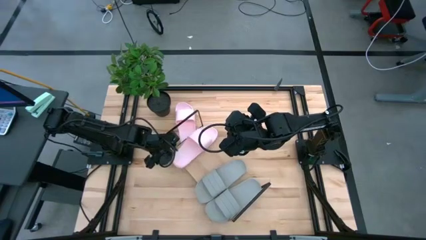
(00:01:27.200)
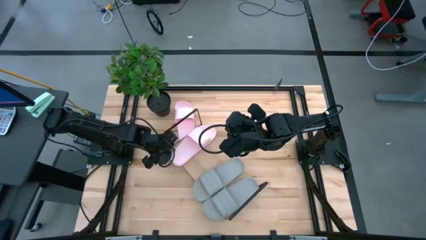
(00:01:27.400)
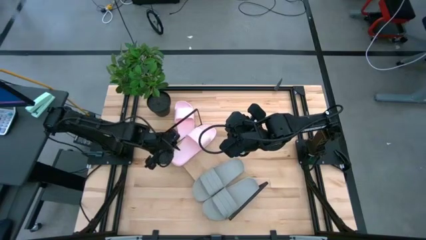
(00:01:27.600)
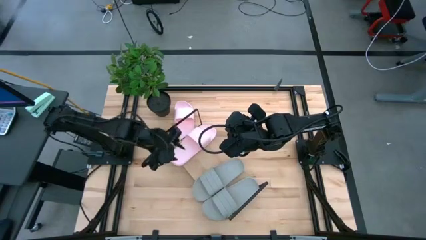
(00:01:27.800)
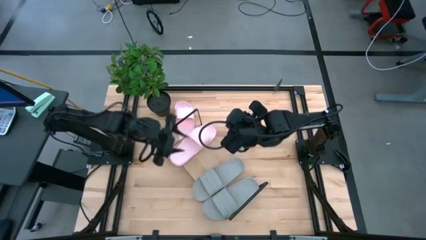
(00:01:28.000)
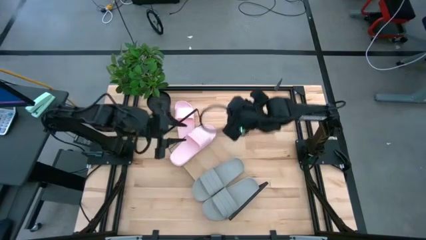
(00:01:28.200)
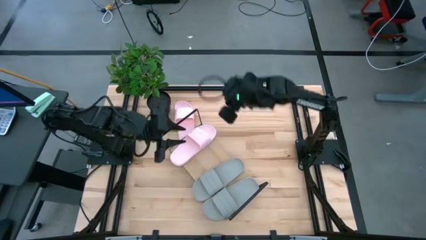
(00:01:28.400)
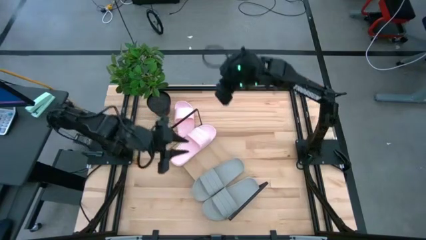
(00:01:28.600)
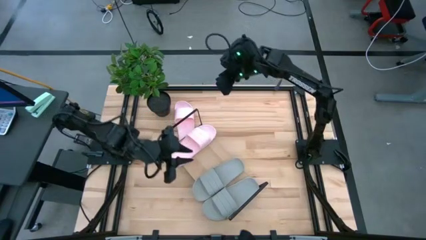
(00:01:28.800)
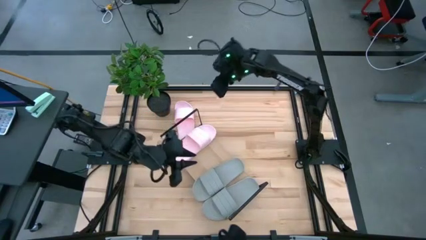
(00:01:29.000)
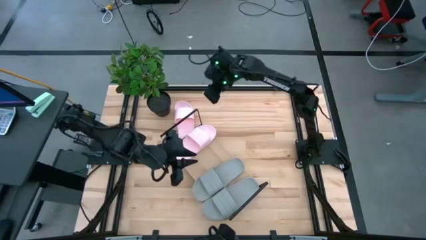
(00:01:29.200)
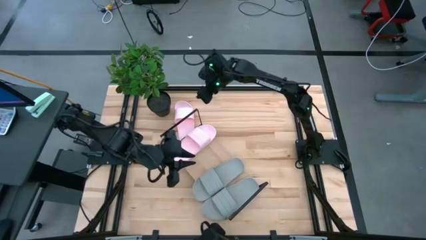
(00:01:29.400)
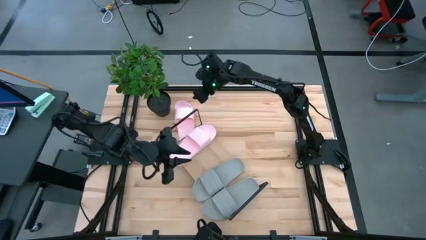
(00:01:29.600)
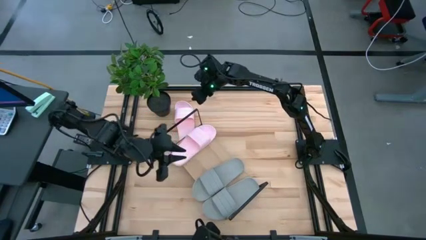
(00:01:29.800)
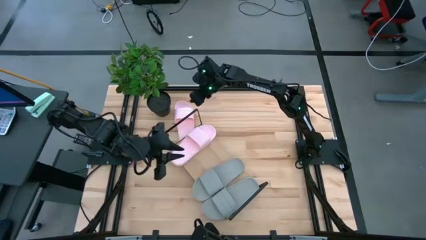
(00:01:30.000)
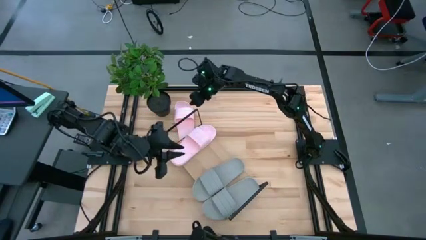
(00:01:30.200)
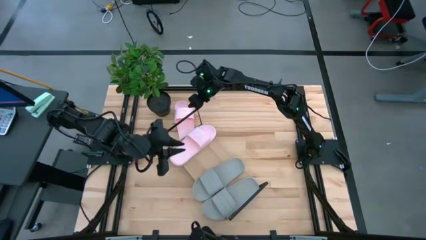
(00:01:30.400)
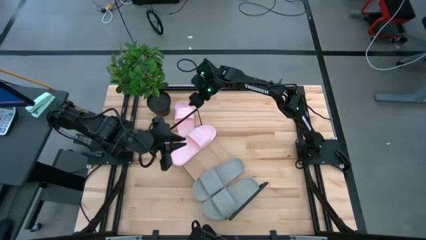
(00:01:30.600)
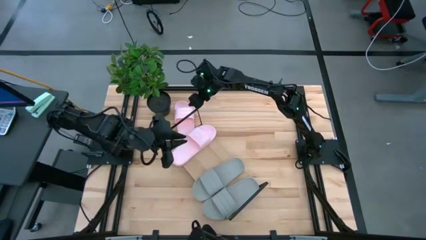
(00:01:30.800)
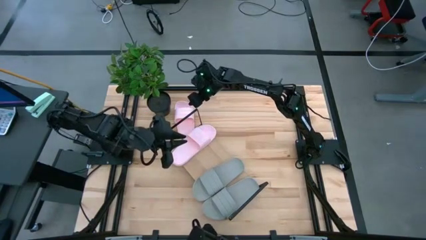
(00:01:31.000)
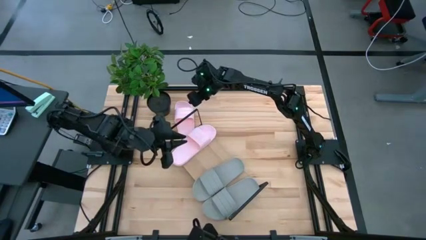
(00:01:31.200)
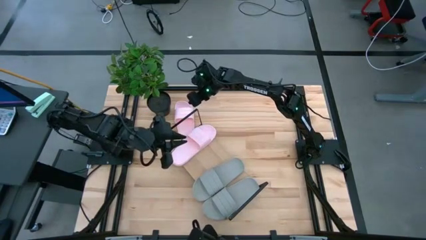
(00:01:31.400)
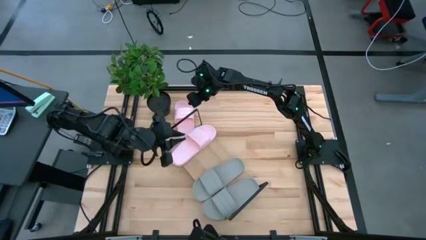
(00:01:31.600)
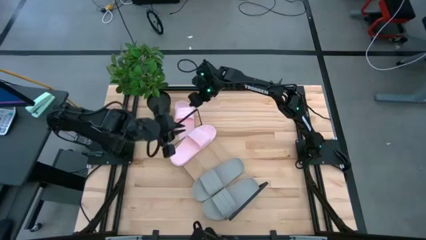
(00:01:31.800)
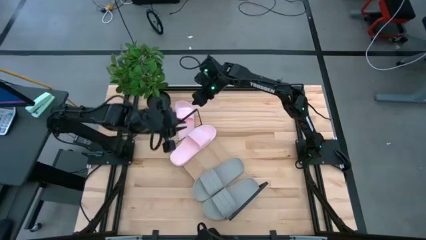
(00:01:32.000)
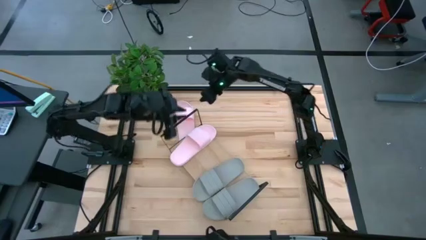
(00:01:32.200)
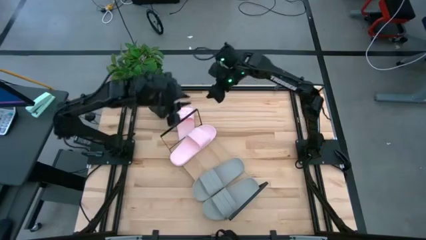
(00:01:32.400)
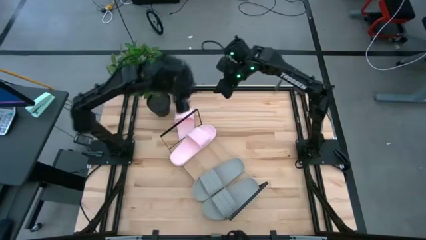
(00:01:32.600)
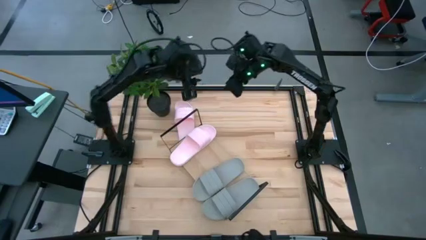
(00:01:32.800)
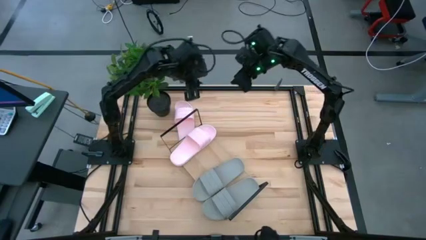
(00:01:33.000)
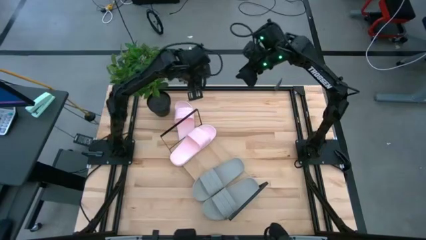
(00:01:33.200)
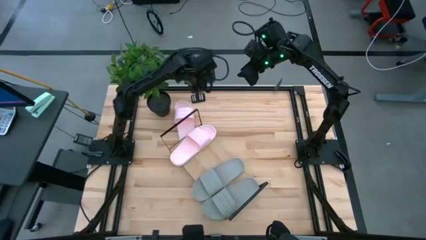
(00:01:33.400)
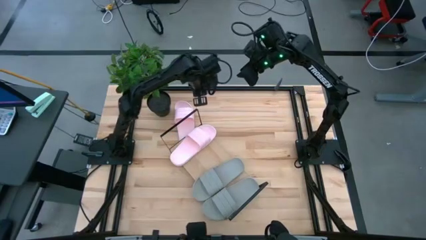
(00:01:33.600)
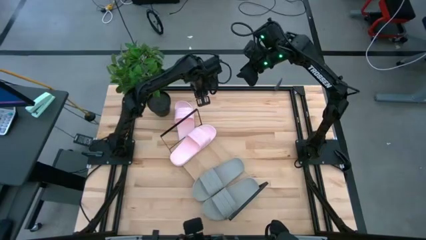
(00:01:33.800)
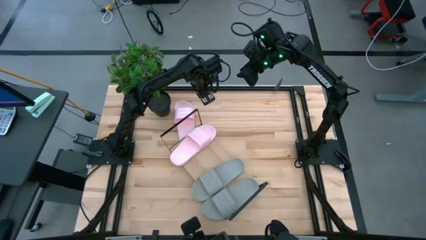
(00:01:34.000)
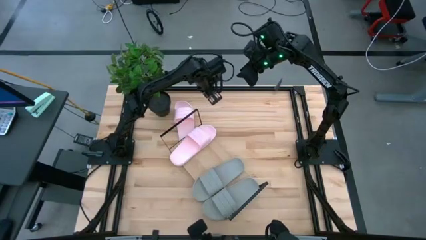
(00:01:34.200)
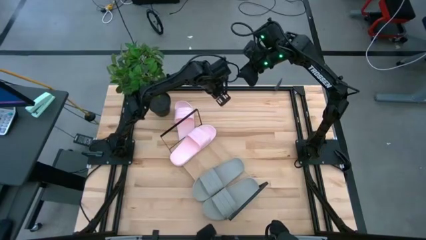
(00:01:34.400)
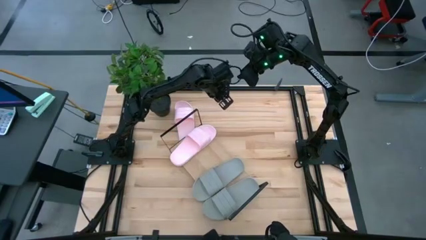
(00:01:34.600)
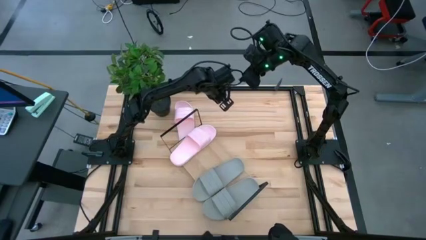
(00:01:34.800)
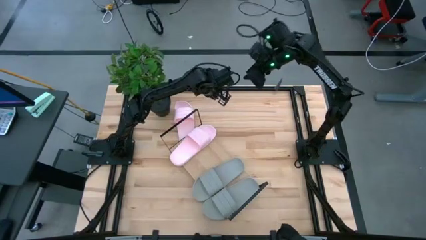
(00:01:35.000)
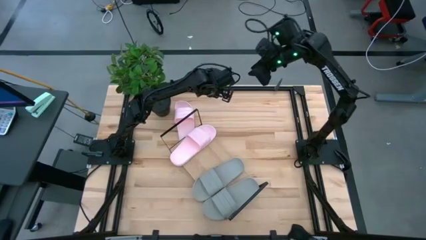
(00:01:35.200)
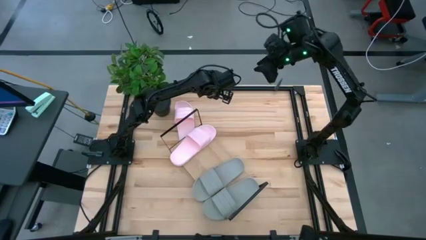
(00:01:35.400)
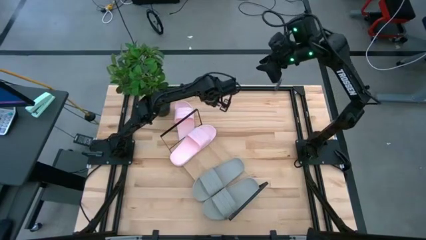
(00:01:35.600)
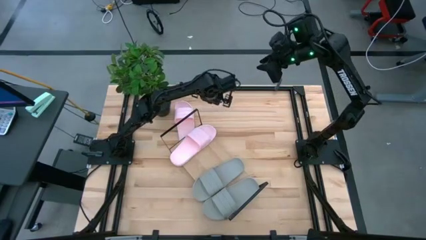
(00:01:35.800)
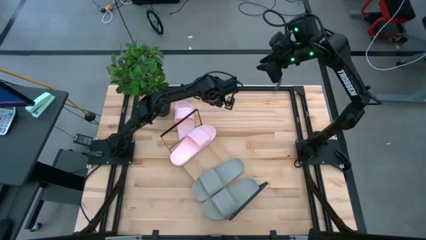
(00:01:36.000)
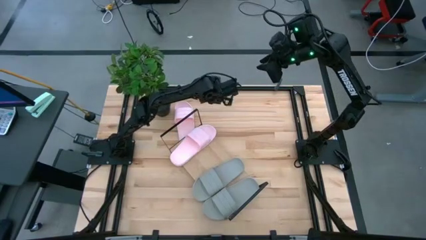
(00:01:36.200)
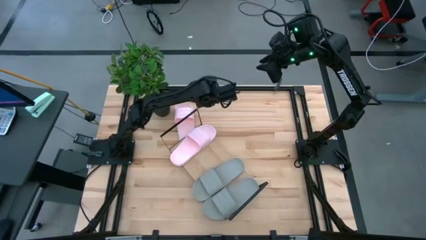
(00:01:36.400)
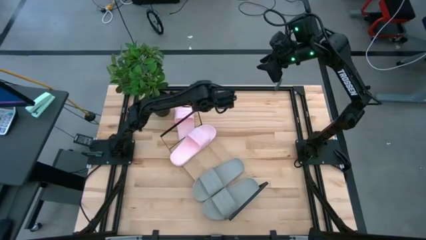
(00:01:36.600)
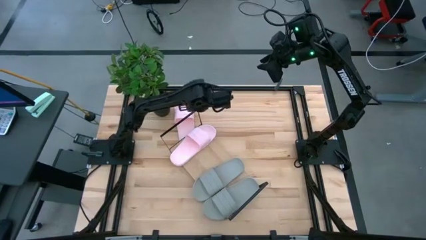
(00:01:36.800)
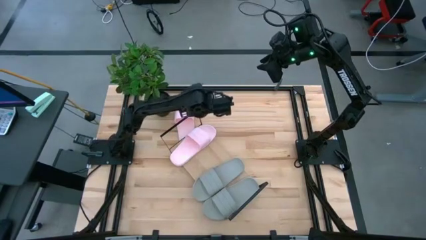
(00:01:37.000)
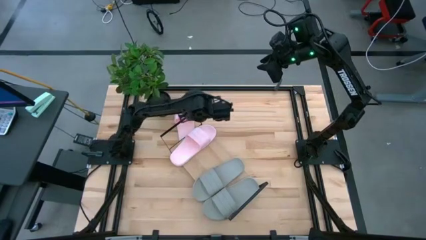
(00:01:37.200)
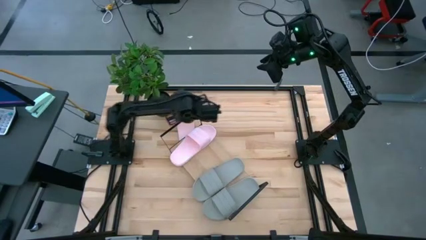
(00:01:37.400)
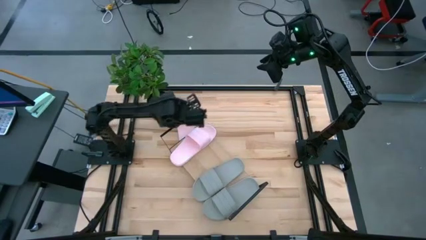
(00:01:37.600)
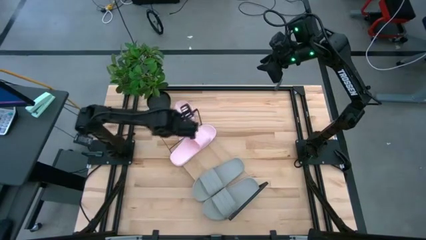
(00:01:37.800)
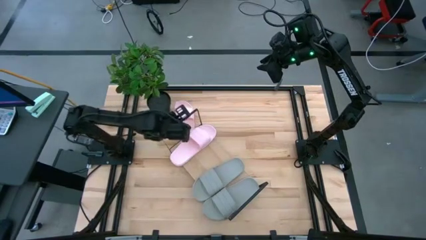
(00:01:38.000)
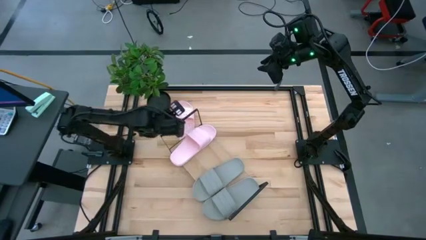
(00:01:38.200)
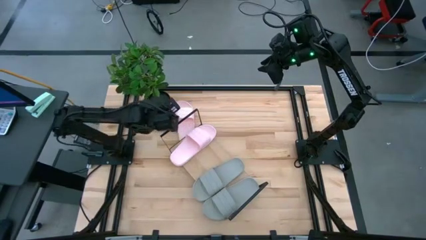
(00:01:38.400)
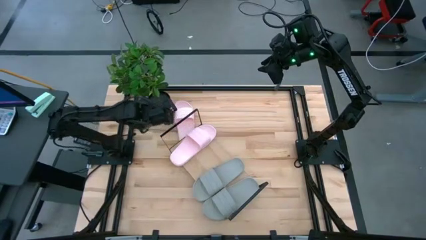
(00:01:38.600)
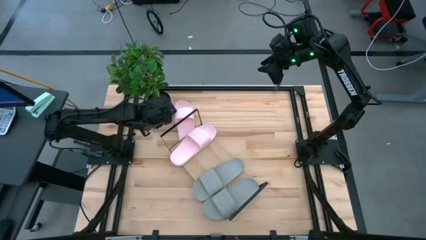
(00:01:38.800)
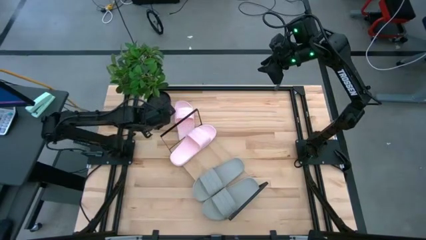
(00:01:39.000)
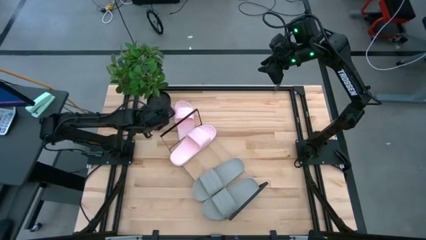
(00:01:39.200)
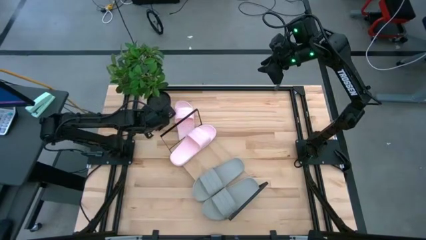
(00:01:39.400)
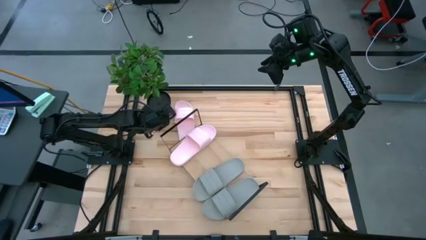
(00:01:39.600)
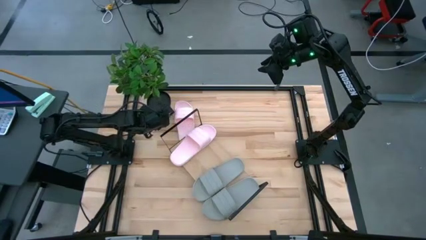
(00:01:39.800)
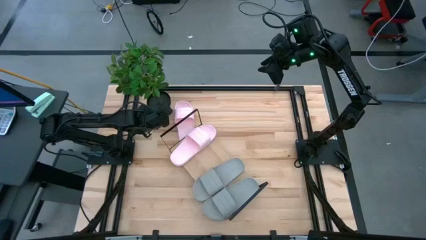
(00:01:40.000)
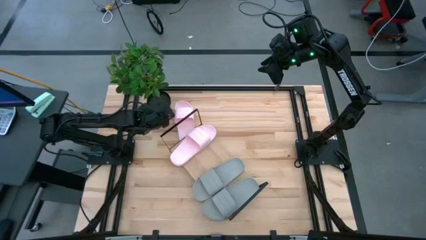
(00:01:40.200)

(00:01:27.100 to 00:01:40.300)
Task: Pick and place slides into the shelf
Put the pink slide on the shelf
